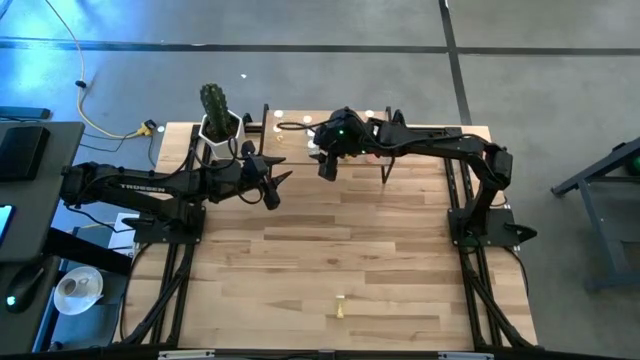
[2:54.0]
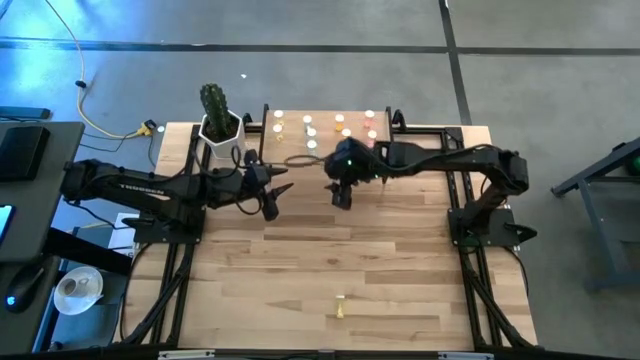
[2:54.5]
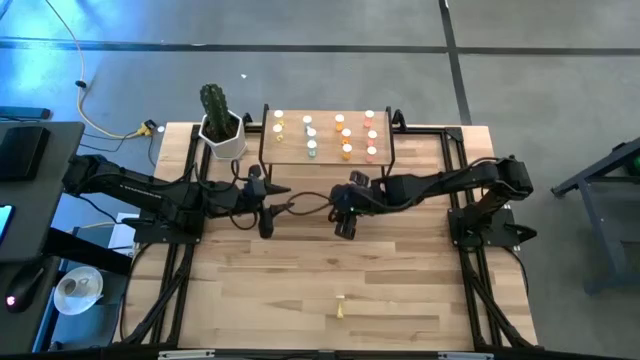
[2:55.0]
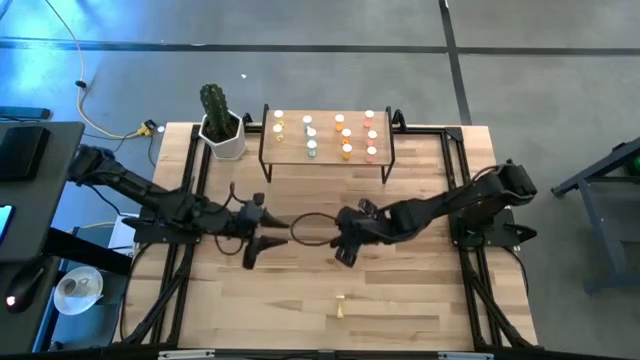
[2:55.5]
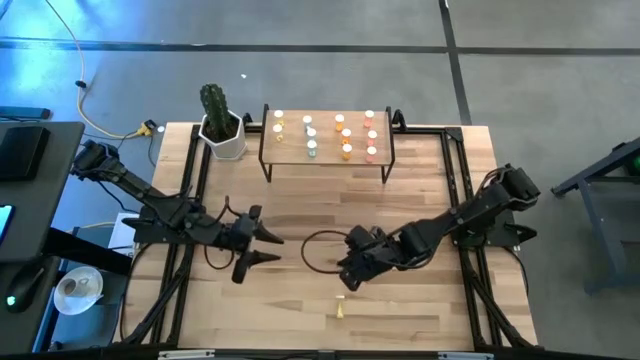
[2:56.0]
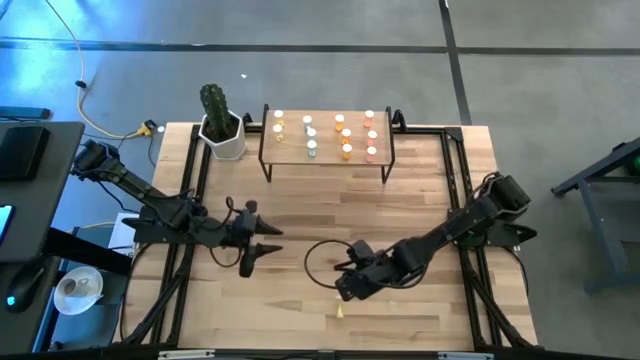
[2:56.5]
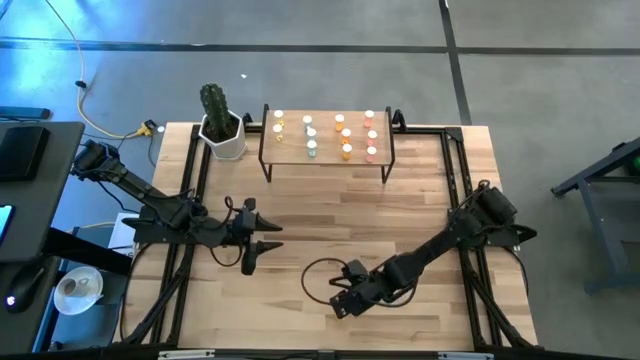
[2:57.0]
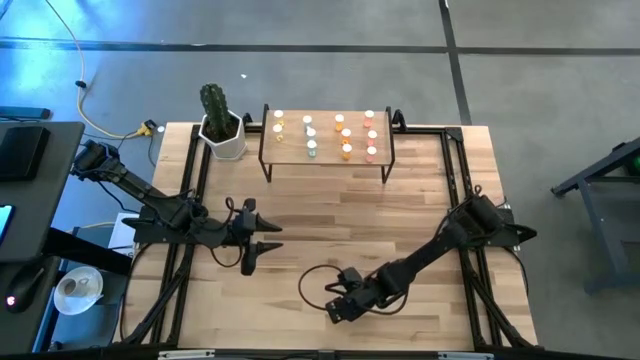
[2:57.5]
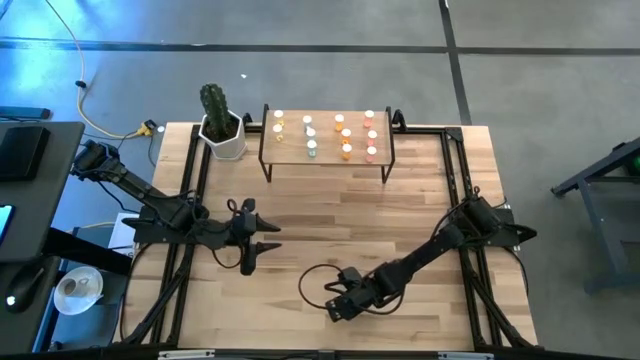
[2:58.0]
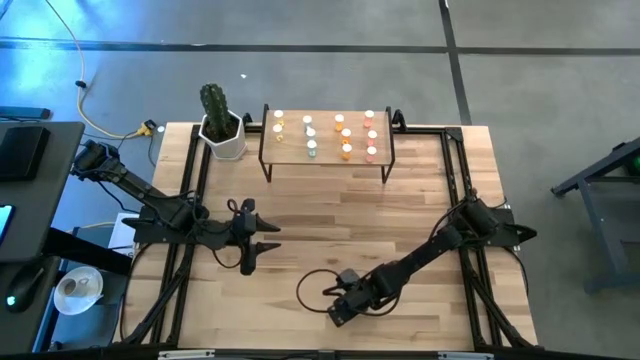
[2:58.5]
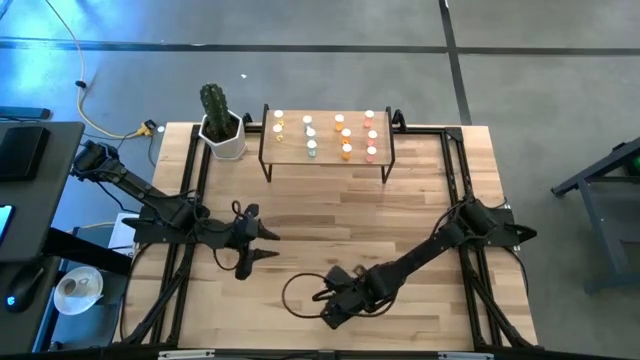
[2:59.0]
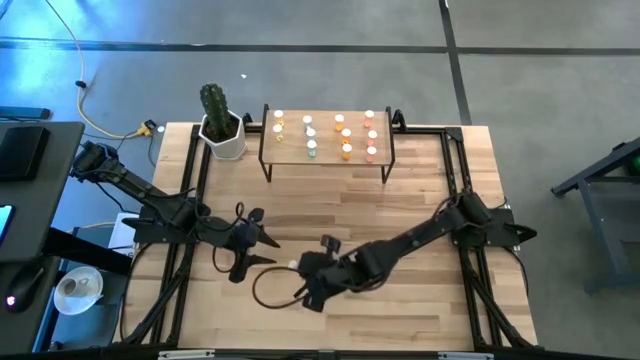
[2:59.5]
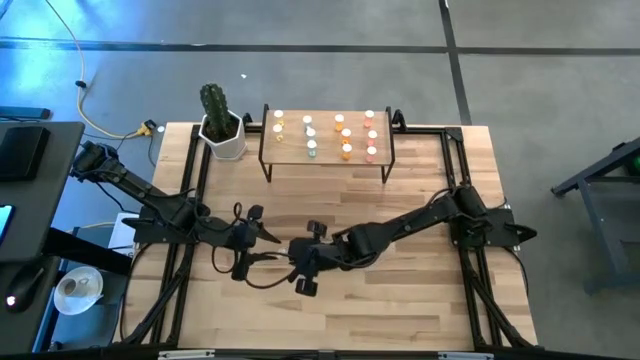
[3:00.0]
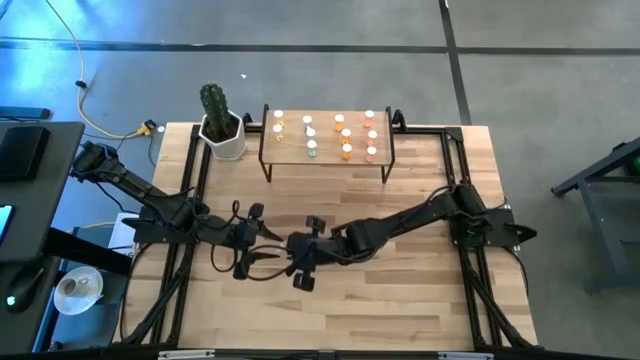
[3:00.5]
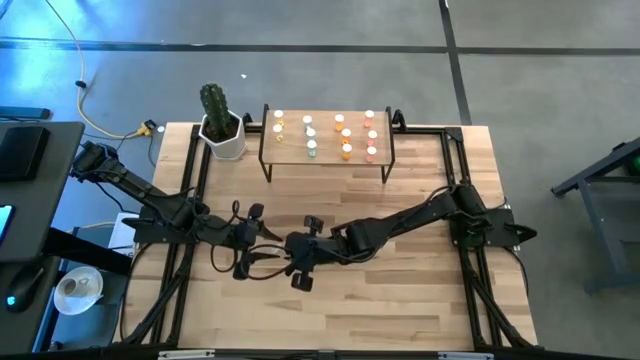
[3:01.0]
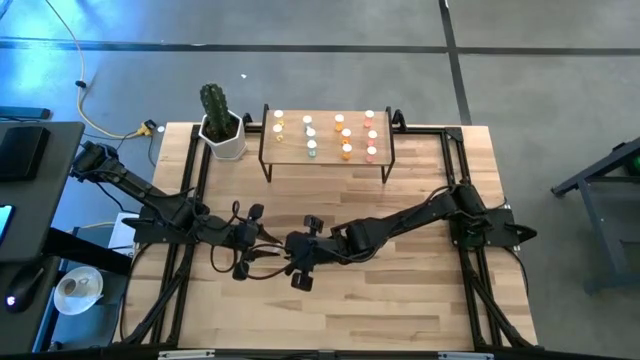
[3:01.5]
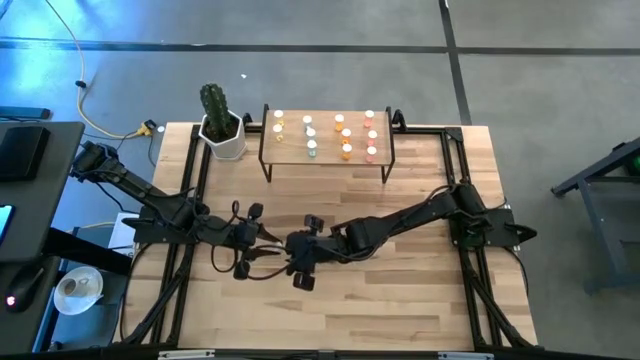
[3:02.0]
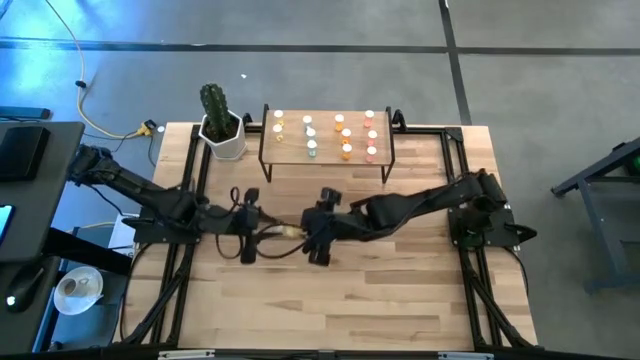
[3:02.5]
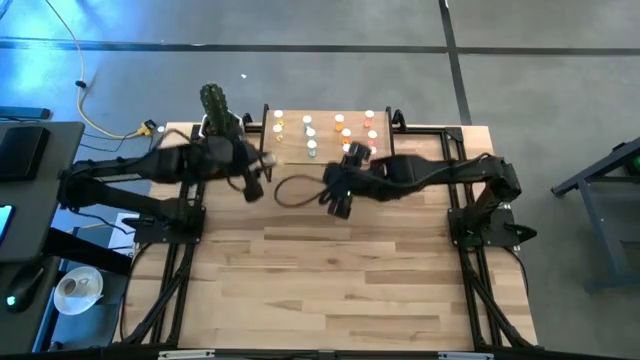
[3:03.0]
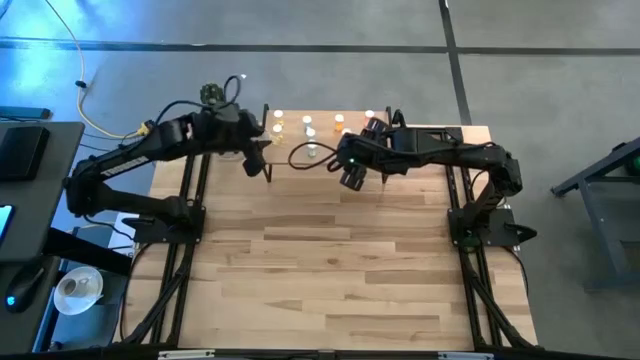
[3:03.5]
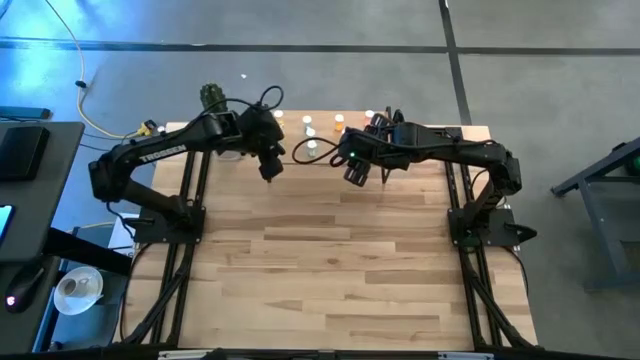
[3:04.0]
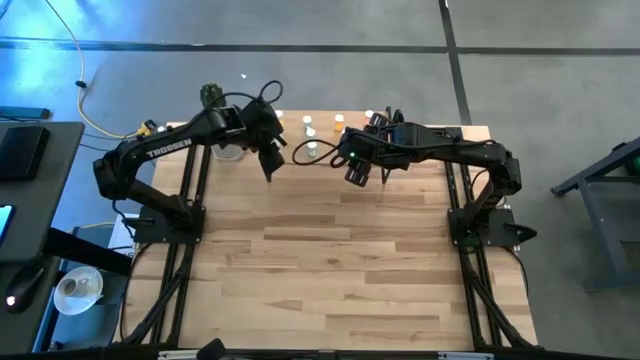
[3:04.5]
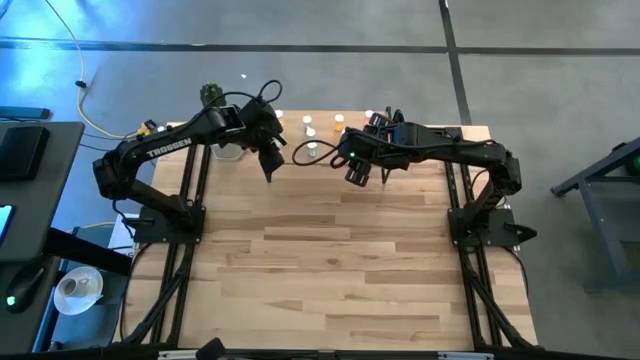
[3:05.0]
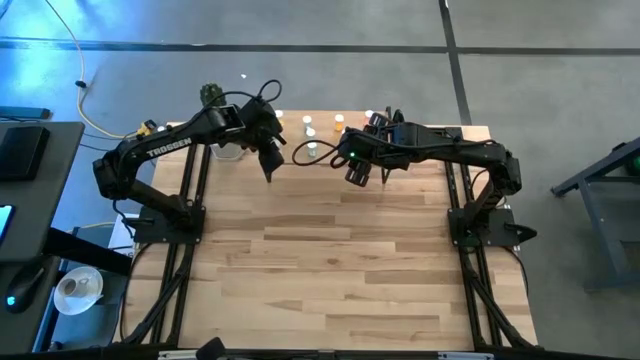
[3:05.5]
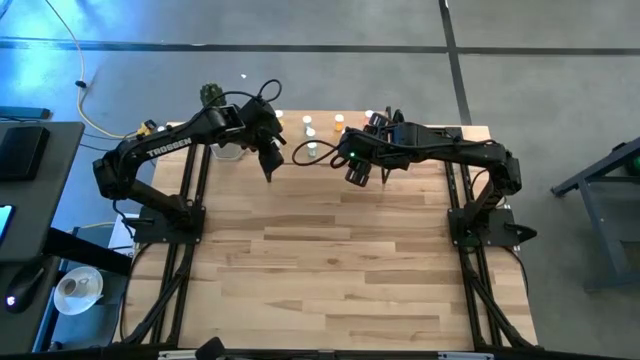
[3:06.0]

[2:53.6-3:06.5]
Task: Pick and place medicine bottles onto shelf by color
Put the yellow pill bottle on the shelf aligned with the other yellow pill bottles

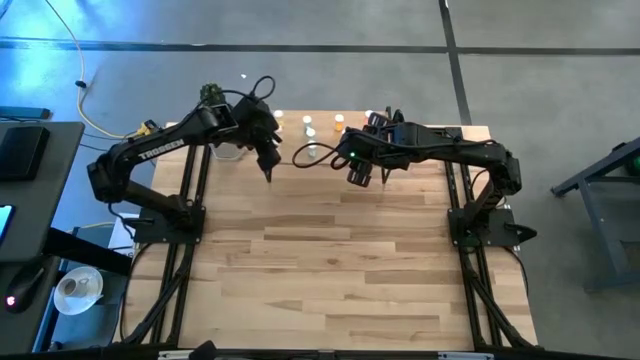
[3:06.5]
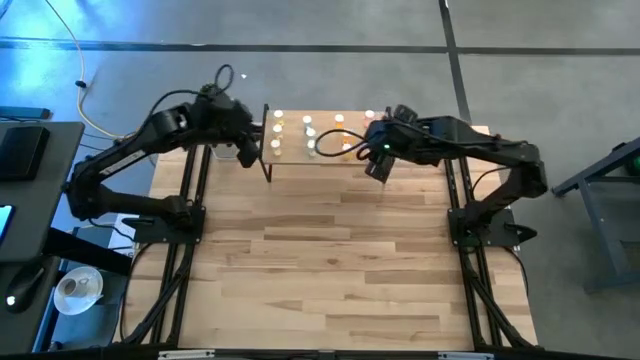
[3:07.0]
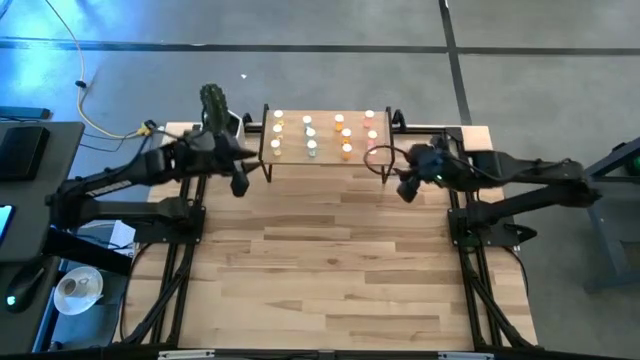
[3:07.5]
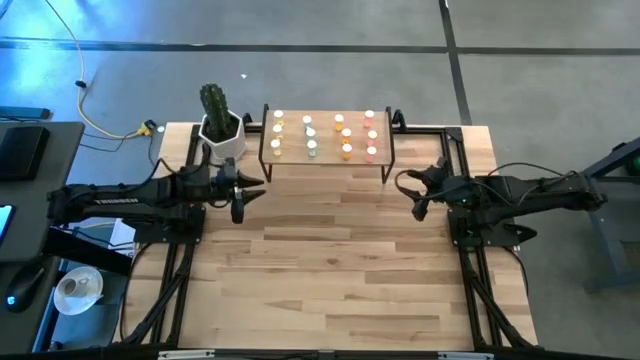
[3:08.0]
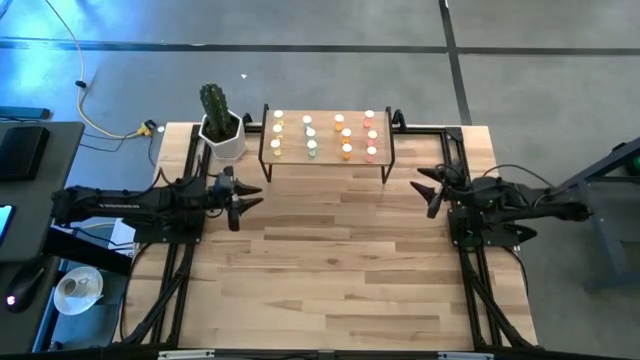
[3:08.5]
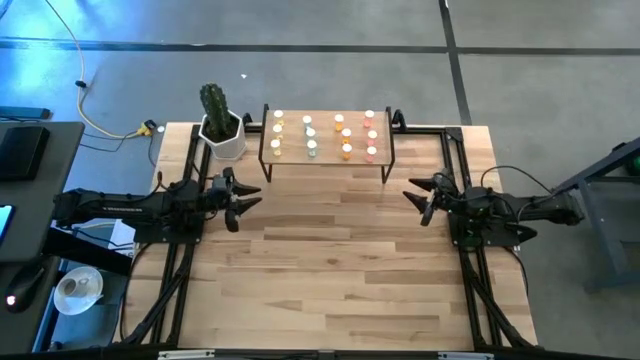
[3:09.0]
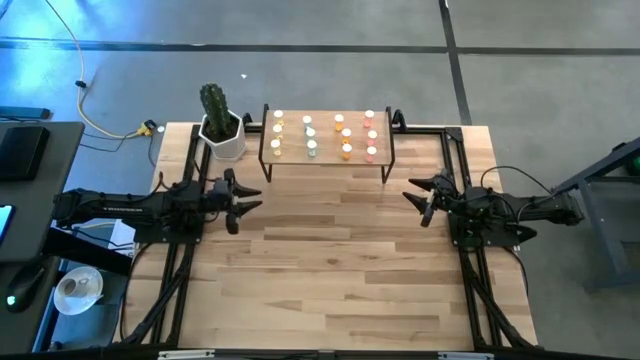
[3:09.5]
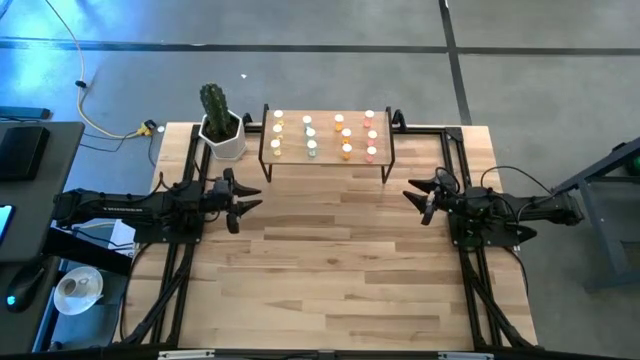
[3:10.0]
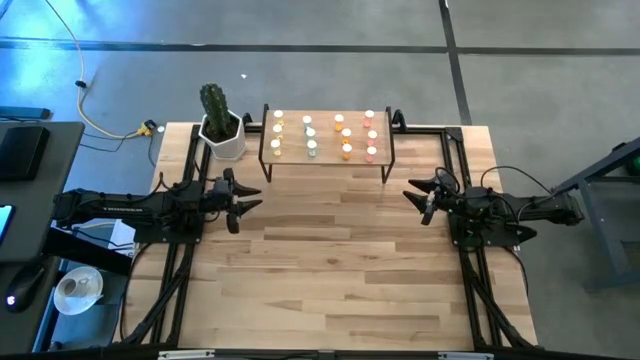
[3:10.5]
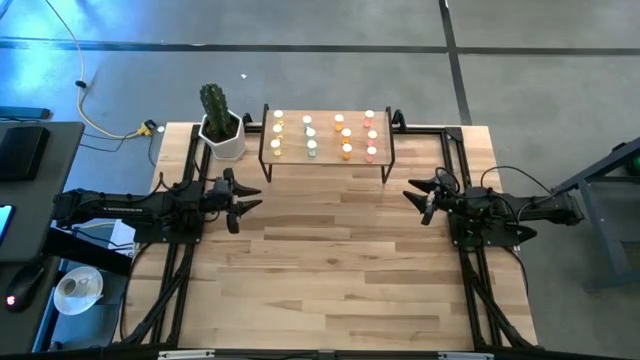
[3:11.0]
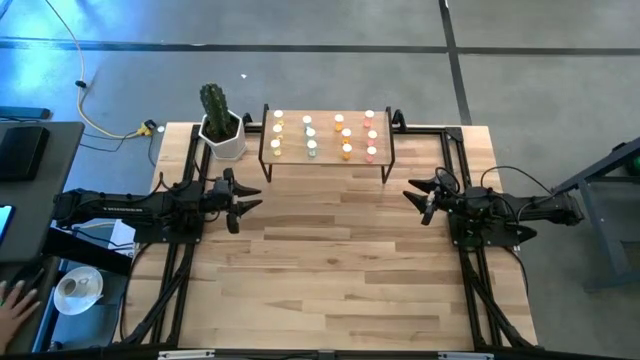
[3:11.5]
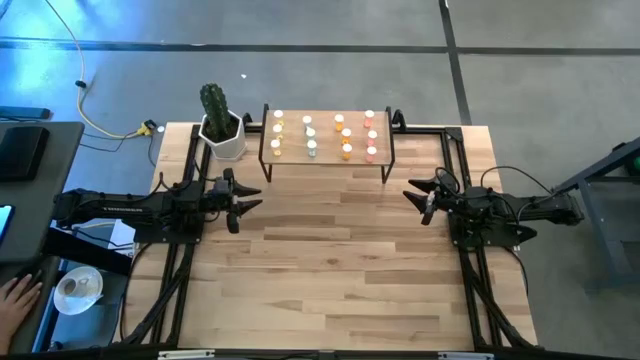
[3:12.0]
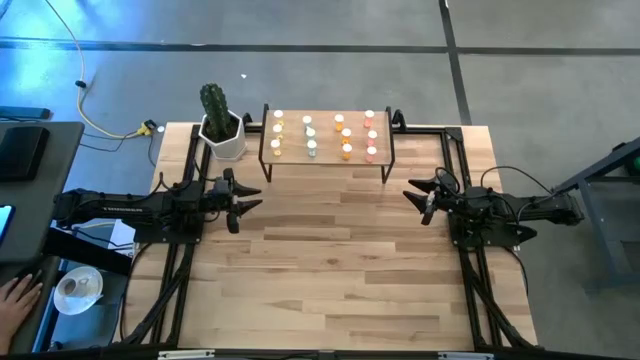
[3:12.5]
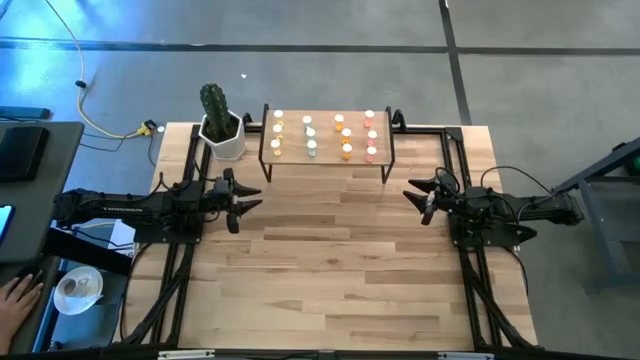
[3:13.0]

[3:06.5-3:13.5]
Return to Home Position

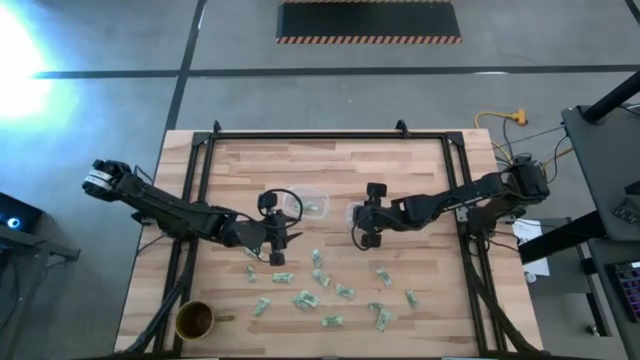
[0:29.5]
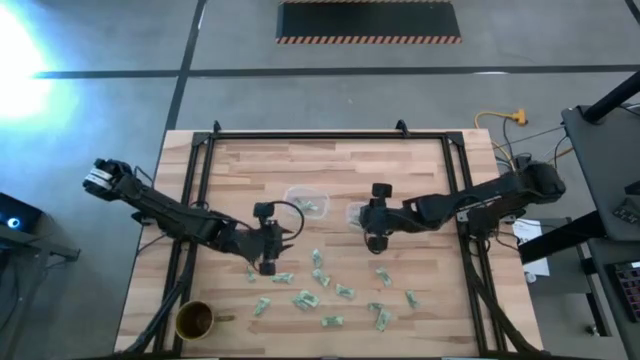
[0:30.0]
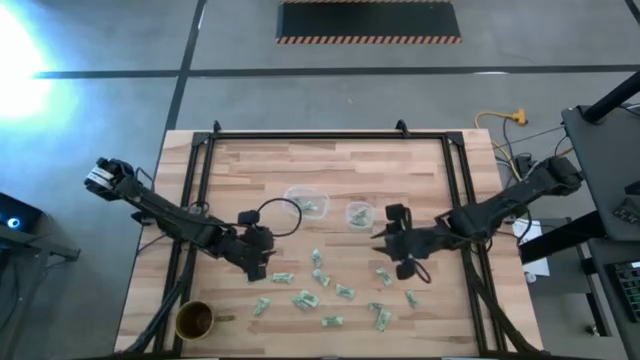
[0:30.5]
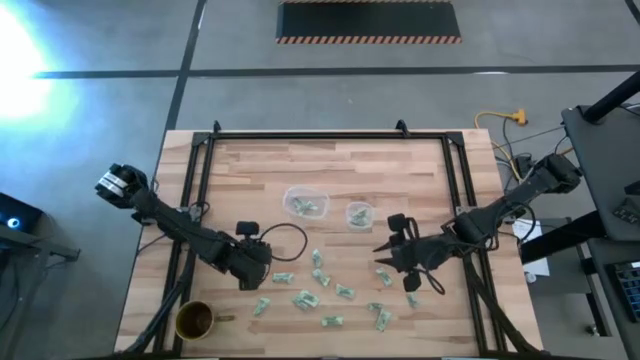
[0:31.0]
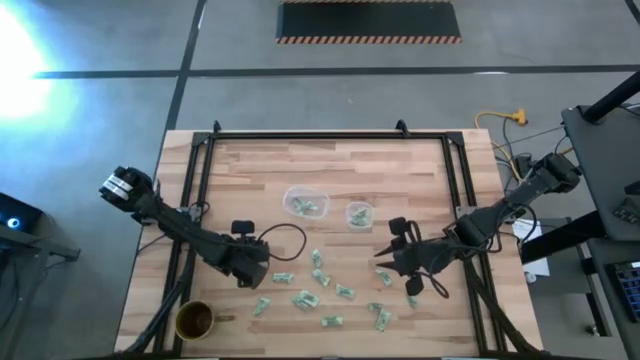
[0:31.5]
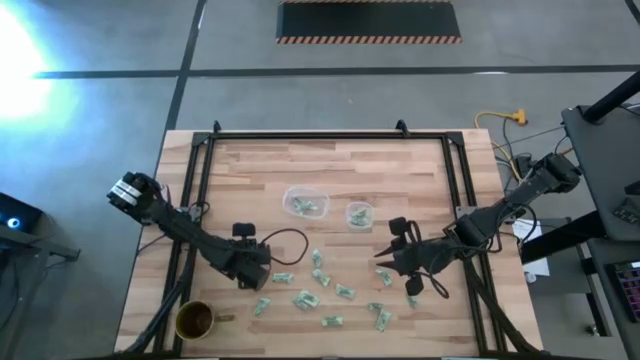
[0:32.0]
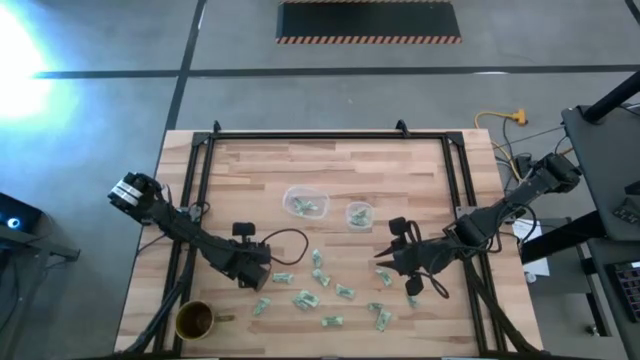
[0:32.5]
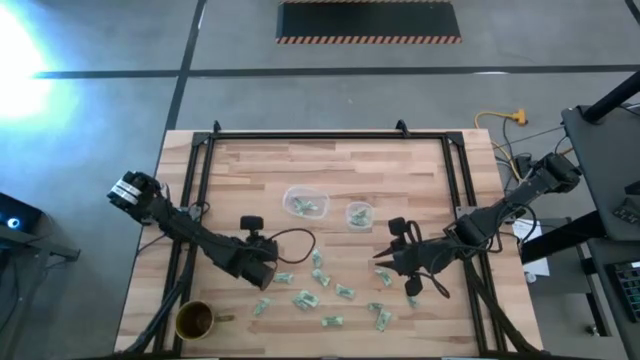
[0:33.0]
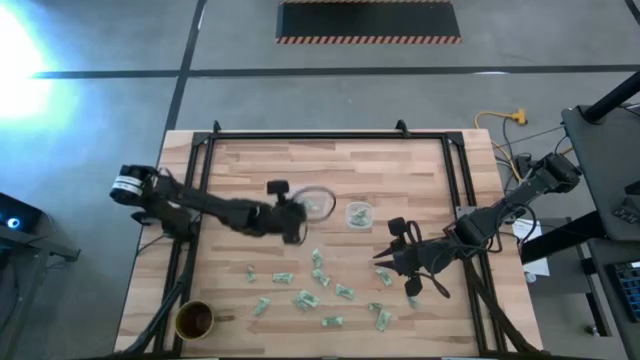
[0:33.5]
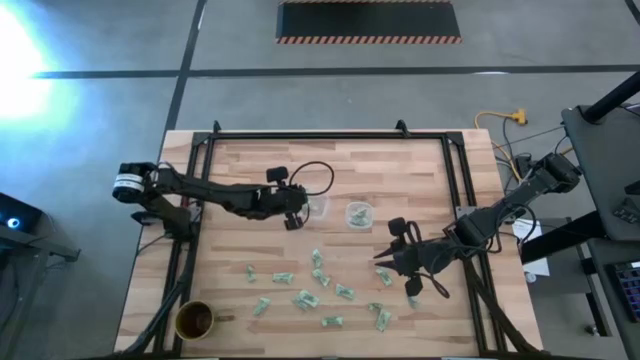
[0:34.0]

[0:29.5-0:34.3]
Task: Pick and place items into bin
Put the green stevia packet into the left transparent bin
